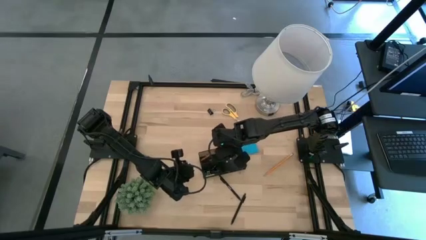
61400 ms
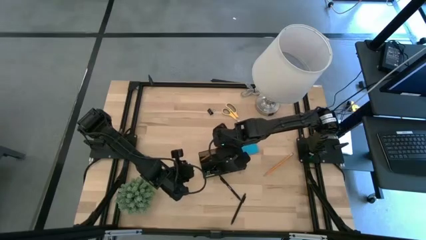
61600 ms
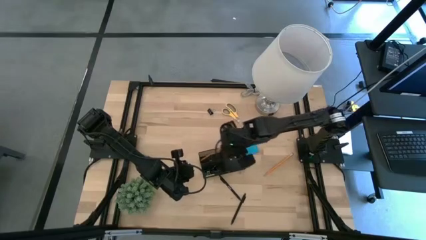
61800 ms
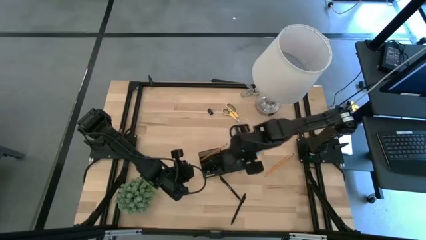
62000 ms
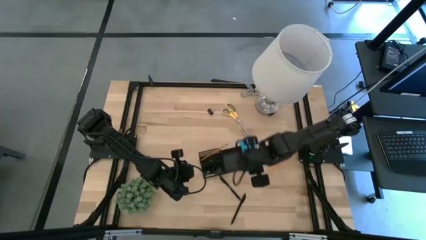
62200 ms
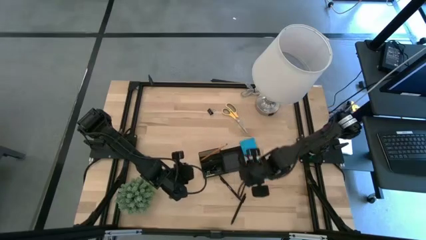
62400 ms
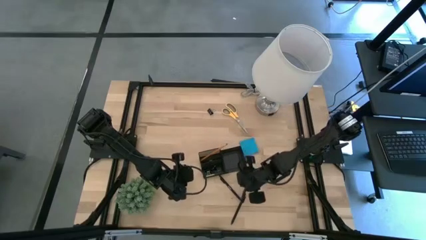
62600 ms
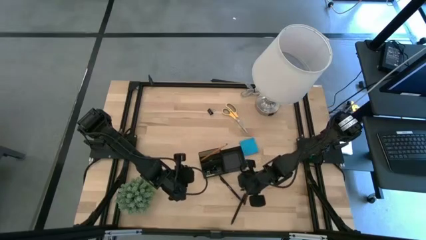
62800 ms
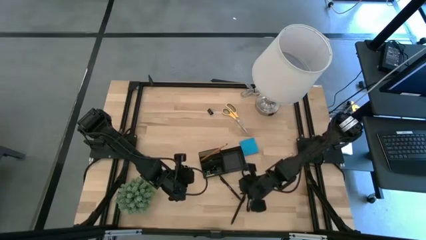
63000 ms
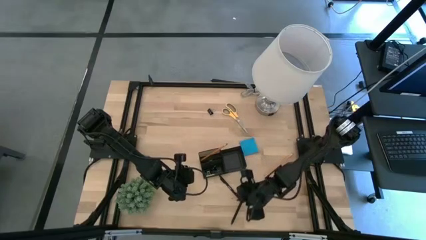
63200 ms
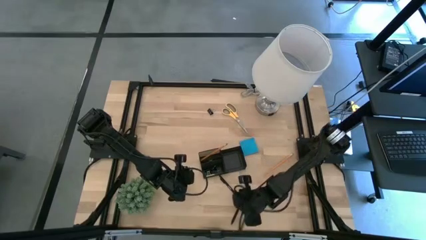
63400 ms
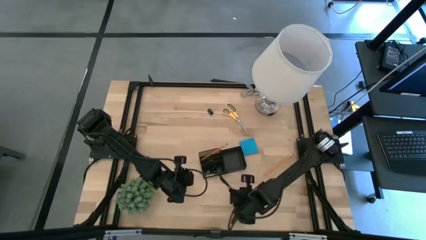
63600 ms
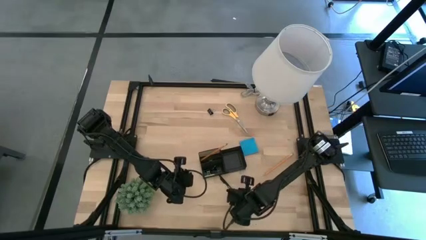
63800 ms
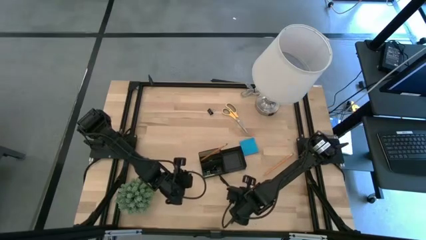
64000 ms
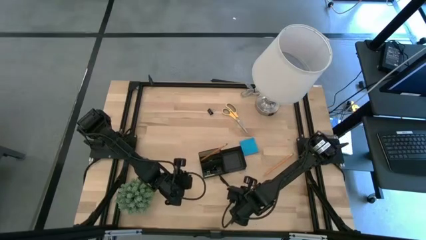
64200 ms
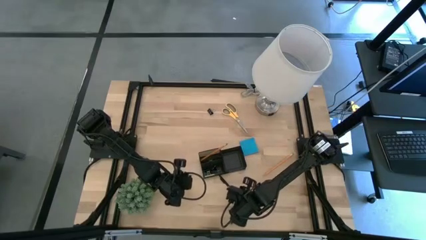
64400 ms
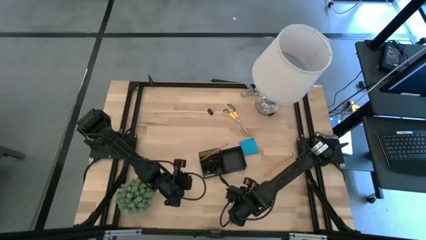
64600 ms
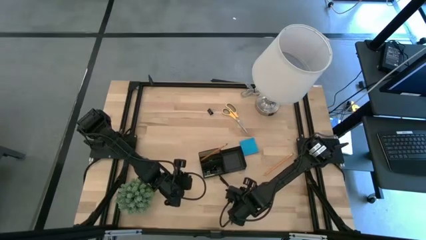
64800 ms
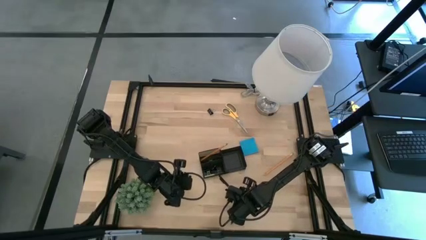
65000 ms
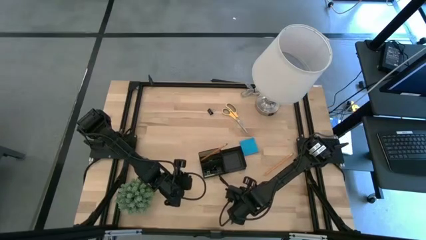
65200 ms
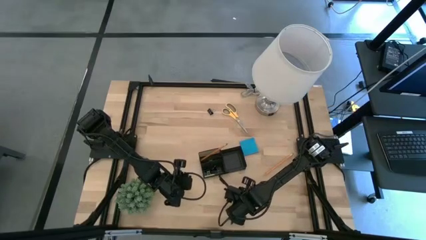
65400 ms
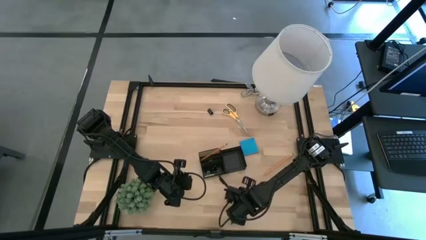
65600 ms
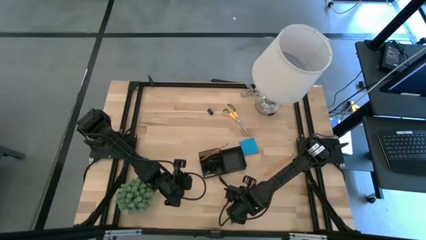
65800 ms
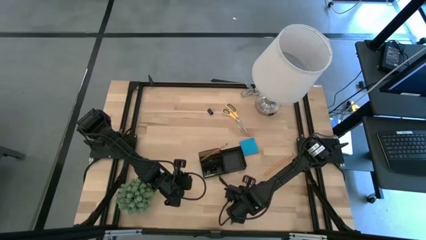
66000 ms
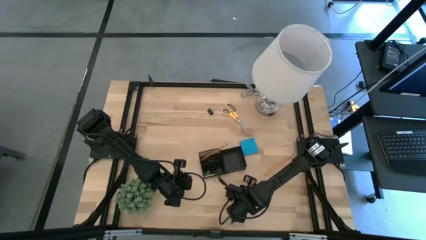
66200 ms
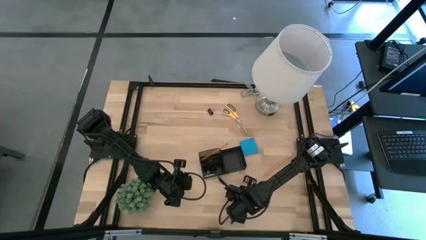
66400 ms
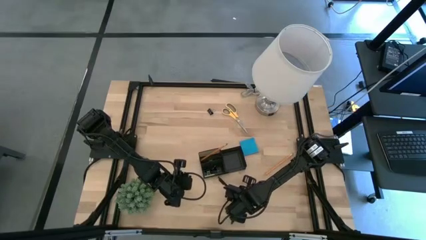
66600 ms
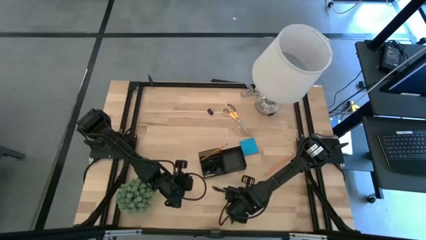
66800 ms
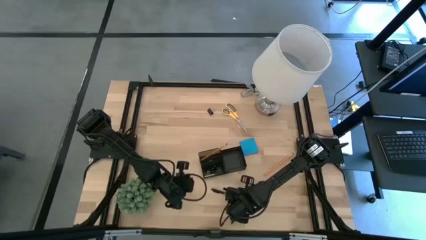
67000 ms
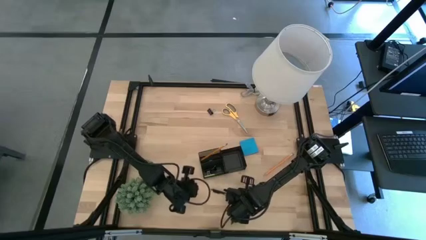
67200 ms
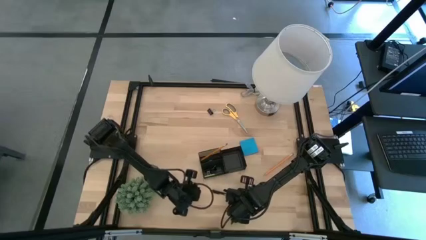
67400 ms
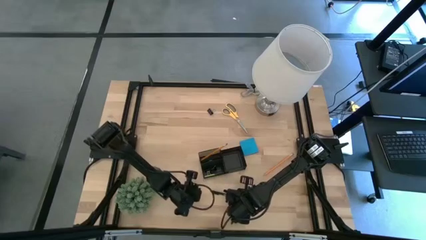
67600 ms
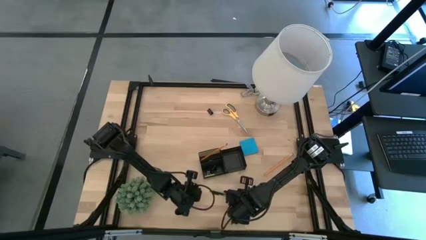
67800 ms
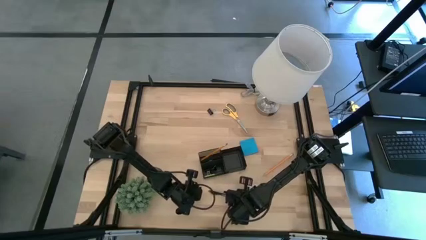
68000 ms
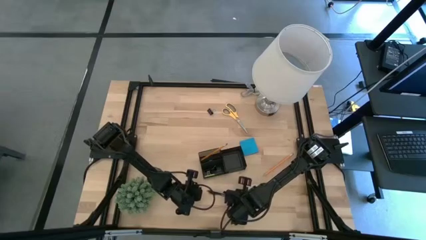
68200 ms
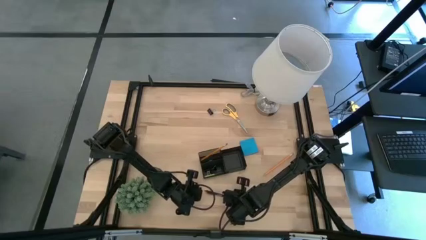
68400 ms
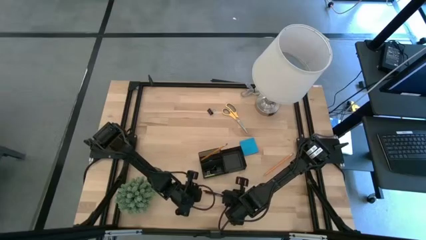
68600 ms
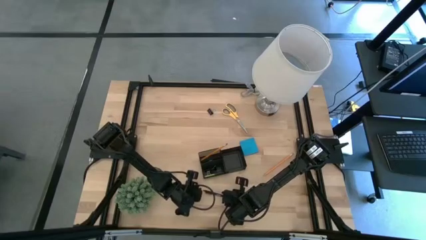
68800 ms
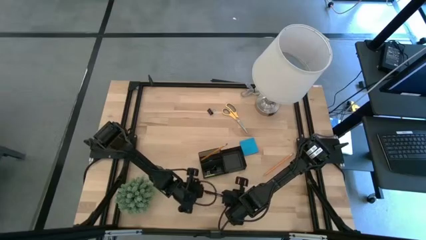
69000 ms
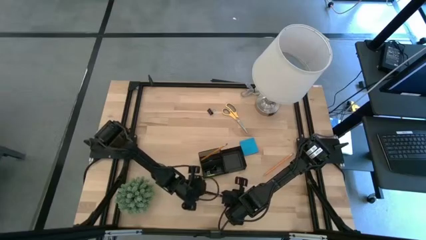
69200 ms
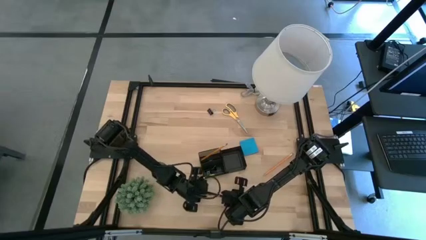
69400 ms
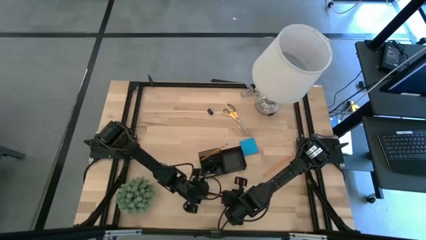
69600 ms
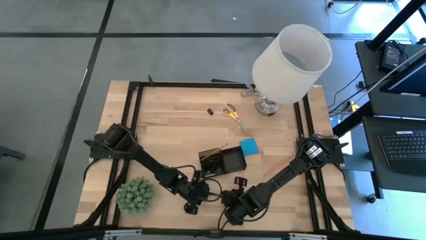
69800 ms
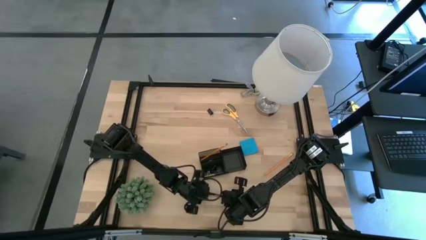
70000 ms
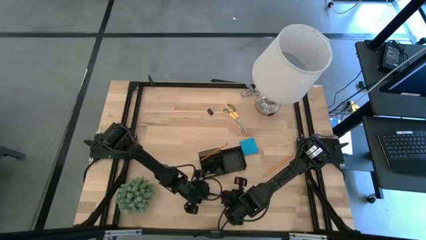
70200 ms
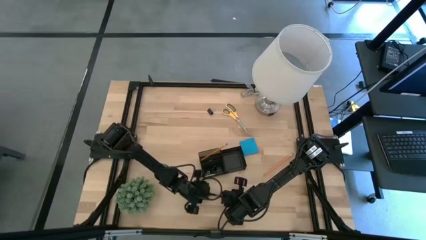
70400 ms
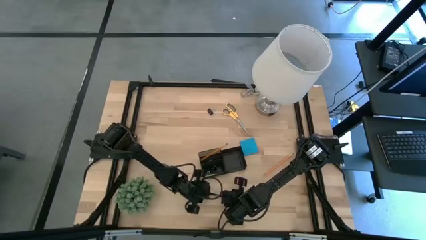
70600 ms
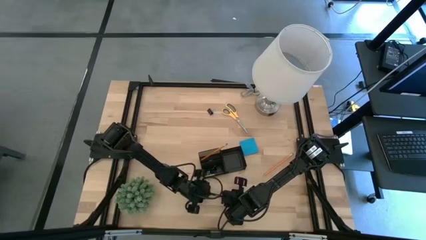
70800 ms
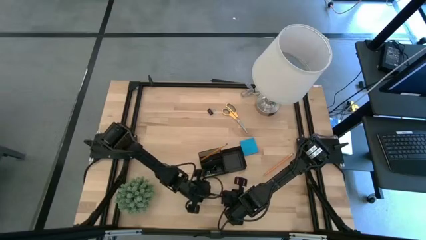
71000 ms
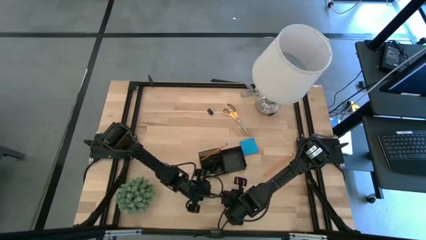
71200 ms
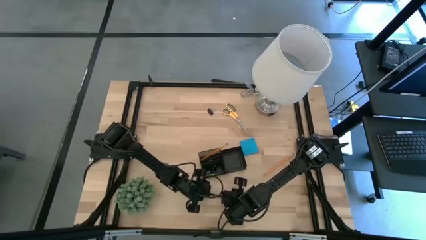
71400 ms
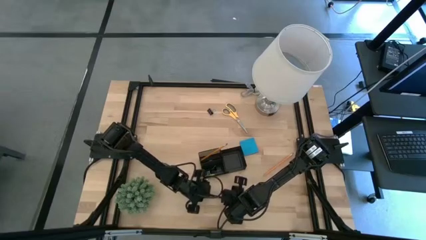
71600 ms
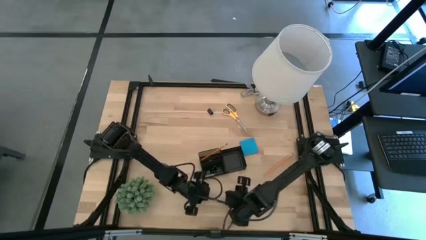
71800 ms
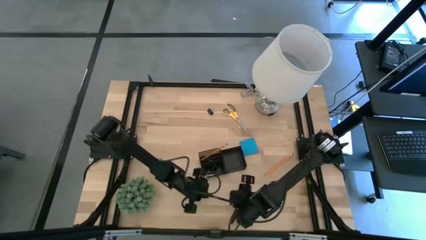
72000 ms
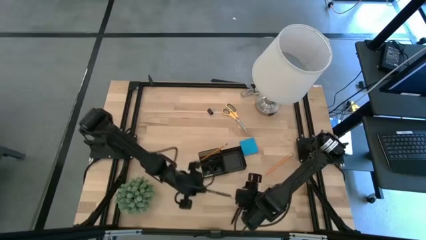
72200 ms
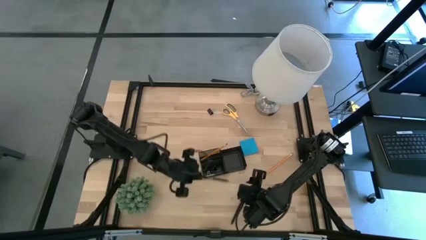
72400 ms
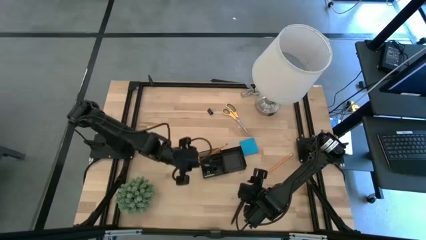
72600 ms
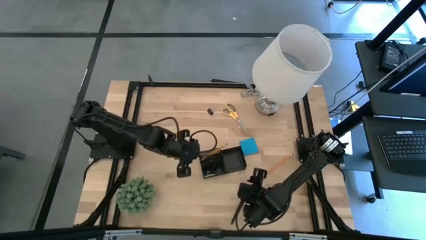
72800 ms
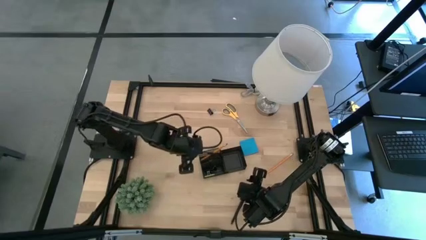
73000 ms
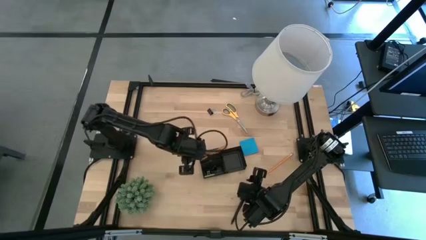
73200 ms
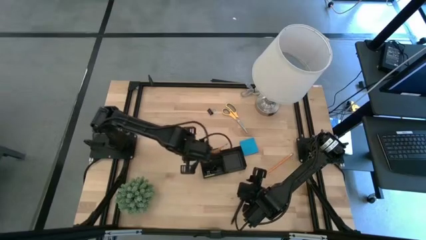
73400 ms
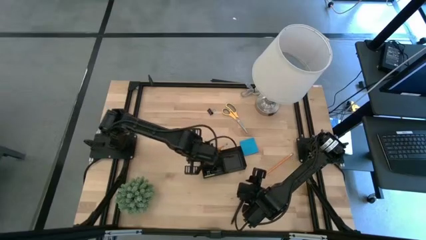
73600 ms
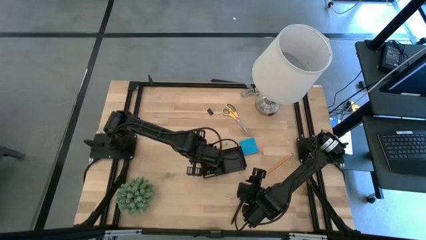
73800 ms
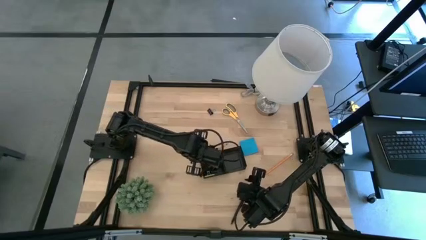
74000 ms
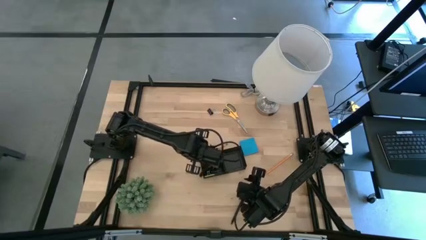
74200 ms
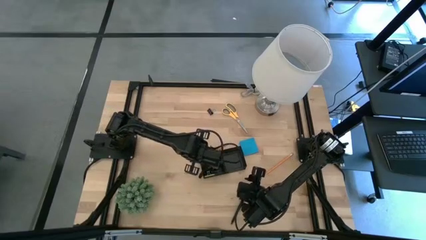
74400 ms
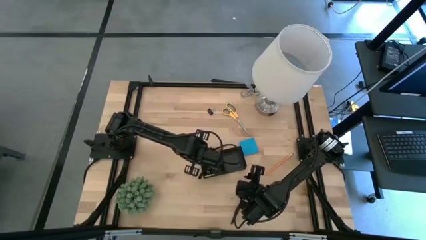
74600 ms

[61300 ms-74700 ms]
Task: Pick and place office supplies into organizer
Put the top black pen into the desk organizer

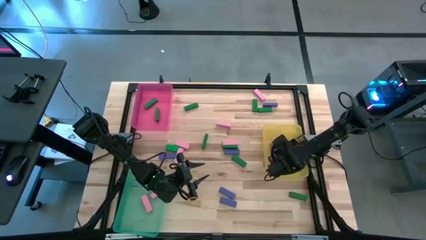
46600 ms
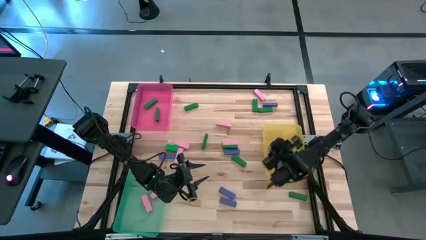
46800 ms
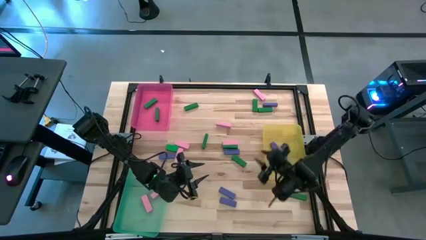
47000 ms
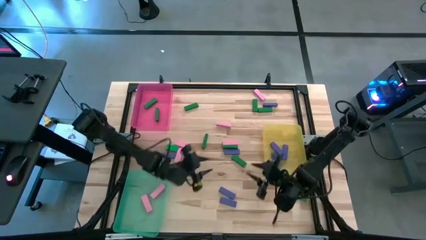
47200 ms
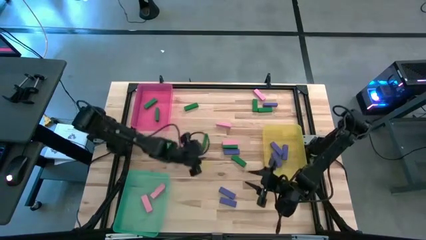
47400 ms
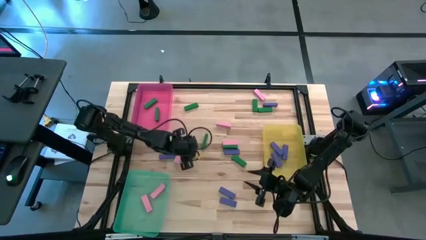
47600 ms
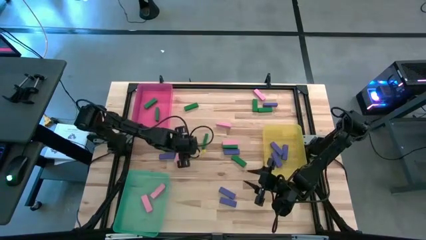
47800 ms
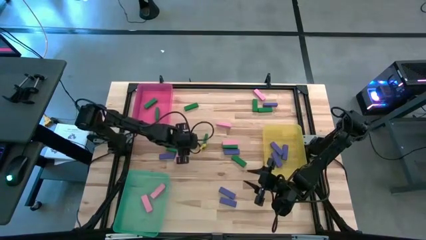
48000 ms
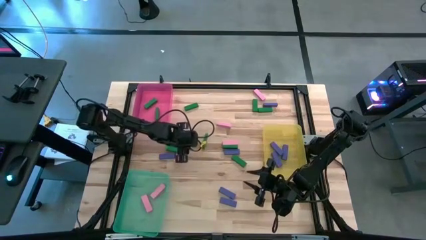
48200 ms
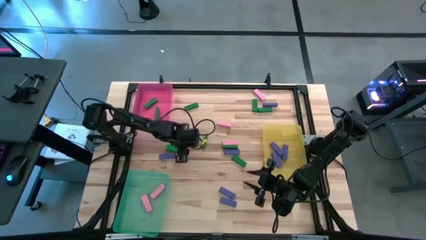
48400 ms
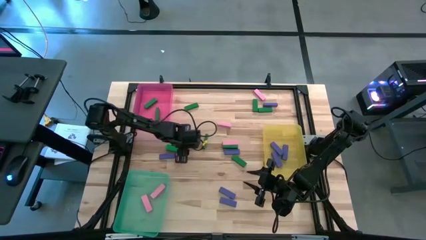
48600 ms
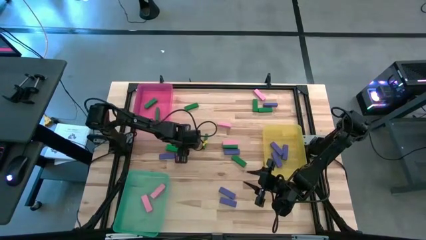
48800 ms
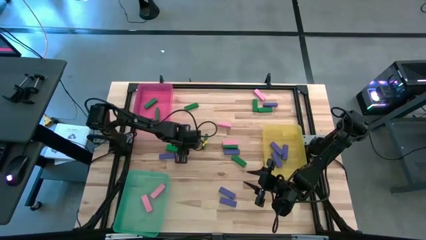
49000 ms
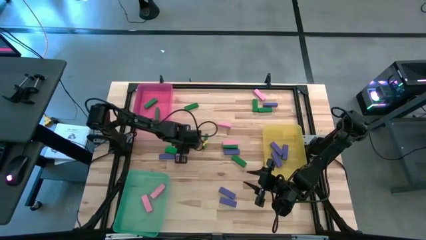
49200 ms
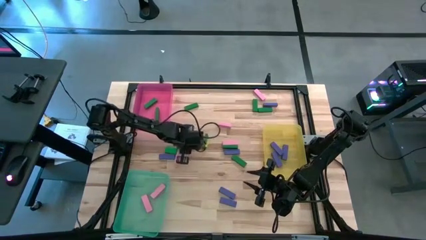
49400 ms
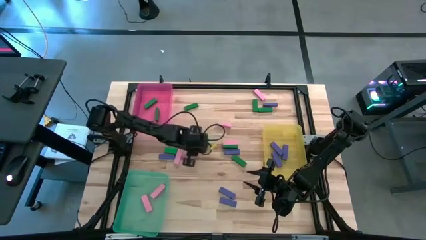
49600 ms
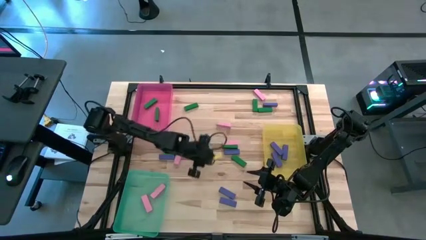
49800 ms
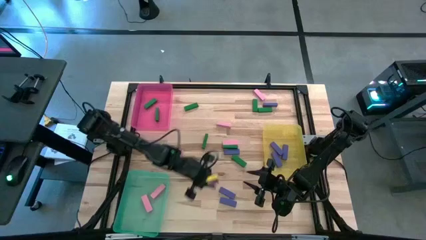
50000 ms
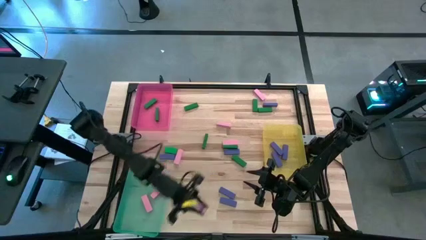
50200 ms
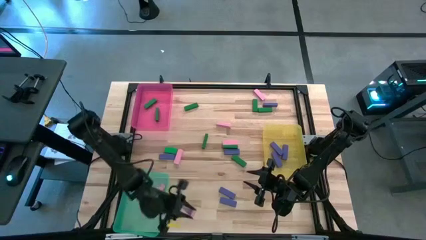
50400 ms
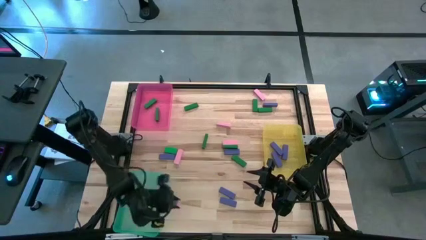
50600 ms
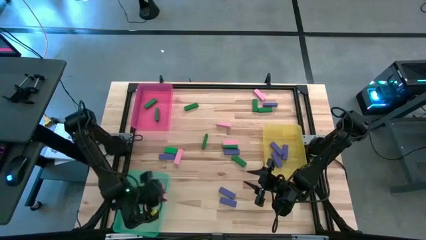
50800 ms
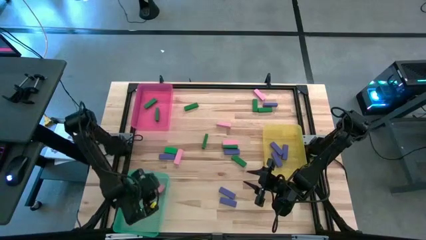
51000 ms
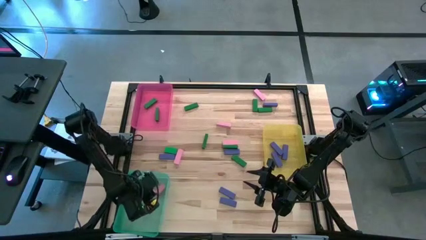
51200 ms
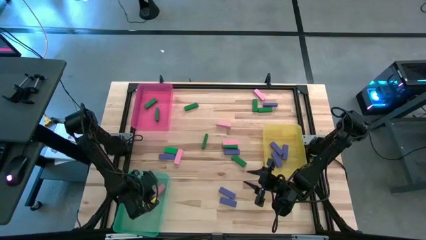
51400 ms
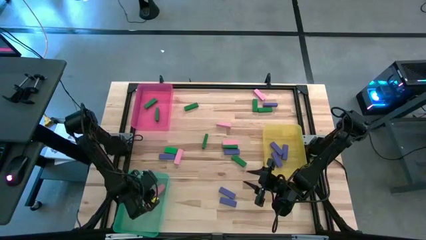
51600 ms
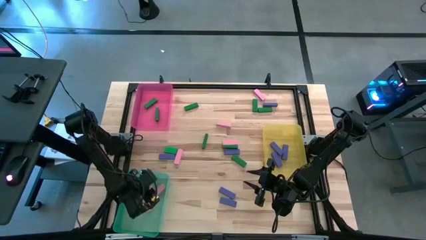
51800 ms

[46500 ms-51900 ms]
Task: Sort blocks
Put the pink block into the green bin
